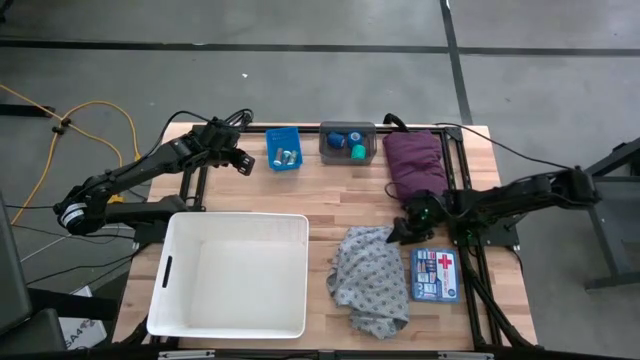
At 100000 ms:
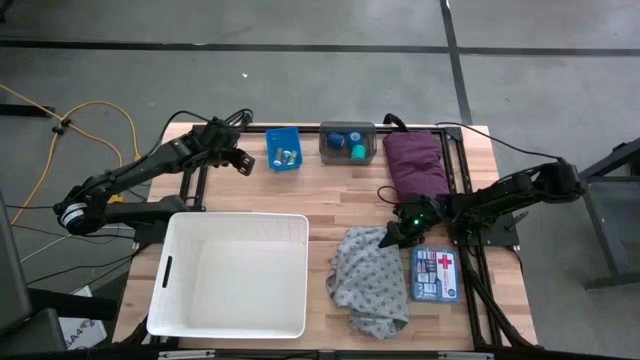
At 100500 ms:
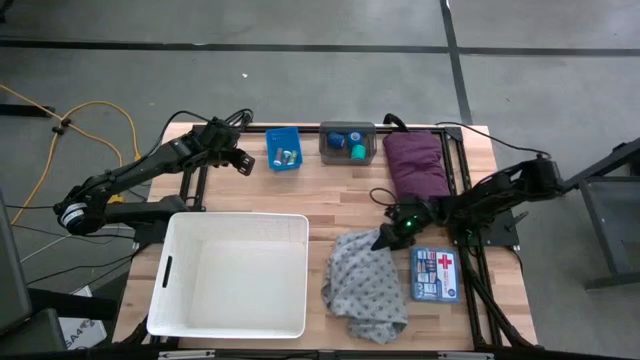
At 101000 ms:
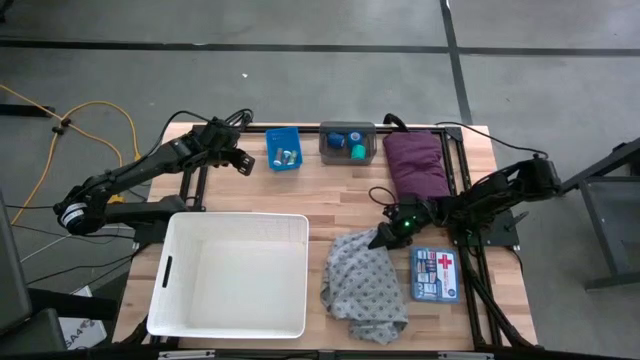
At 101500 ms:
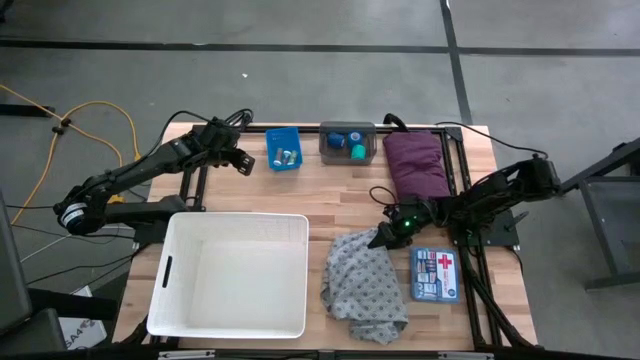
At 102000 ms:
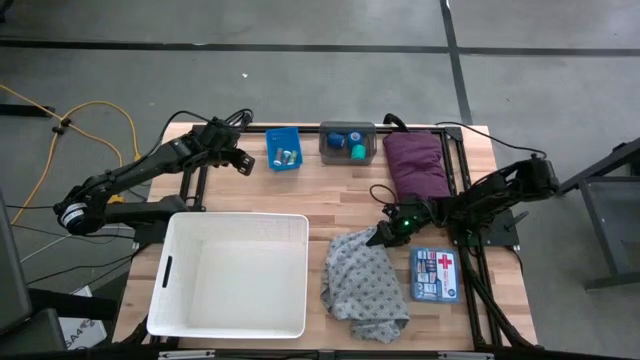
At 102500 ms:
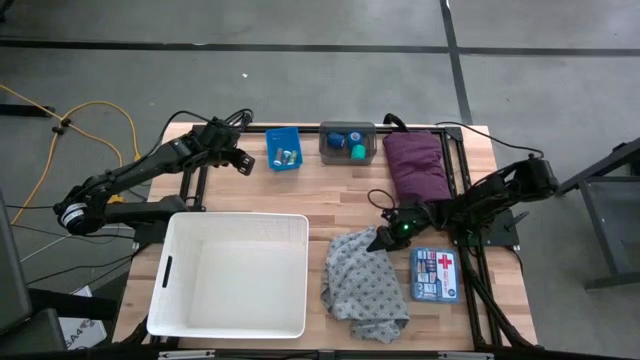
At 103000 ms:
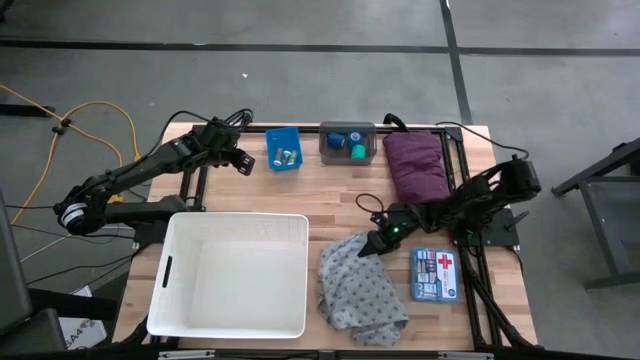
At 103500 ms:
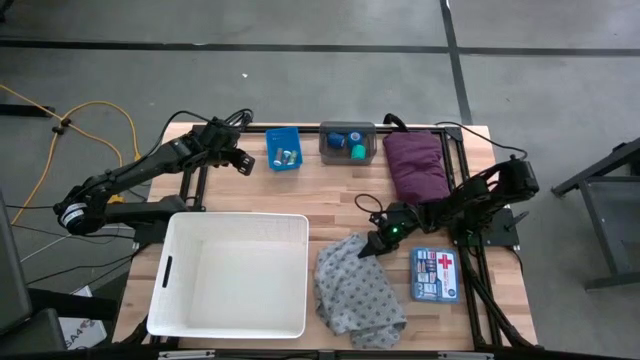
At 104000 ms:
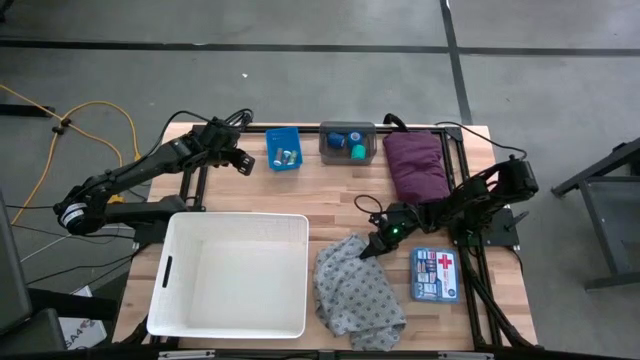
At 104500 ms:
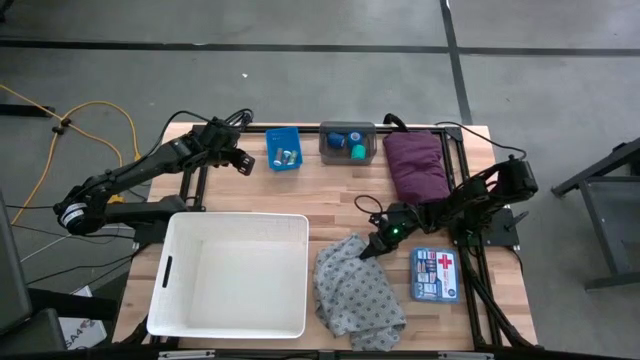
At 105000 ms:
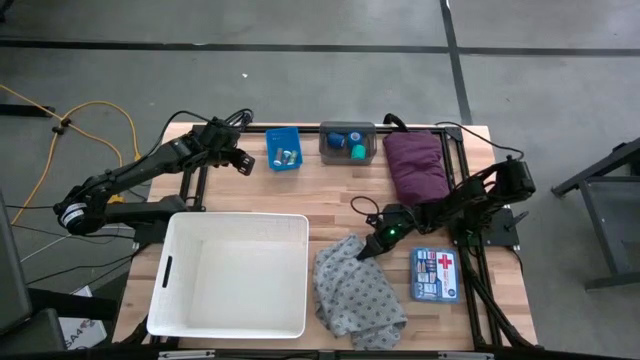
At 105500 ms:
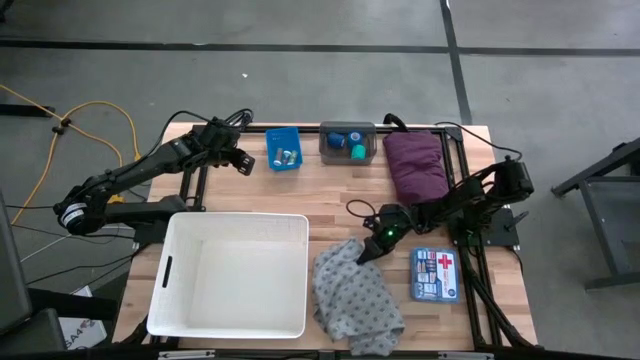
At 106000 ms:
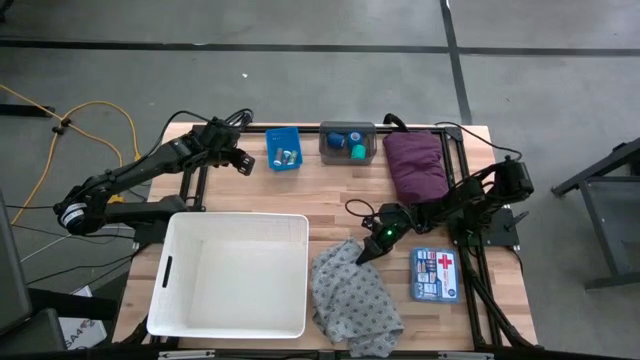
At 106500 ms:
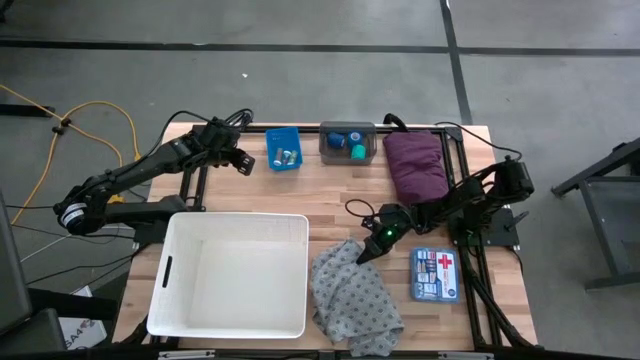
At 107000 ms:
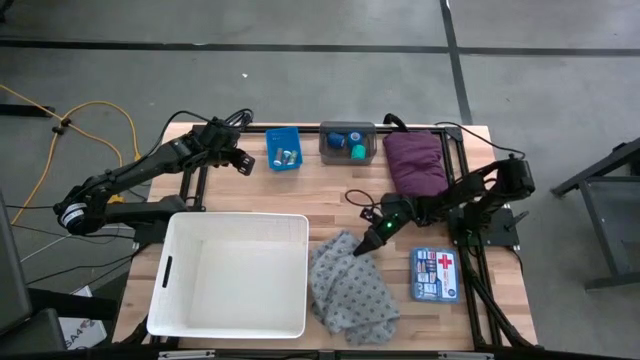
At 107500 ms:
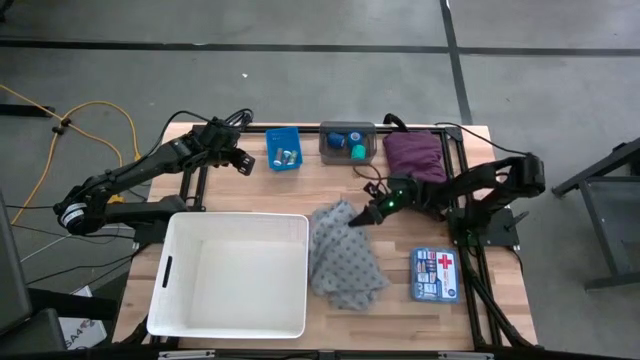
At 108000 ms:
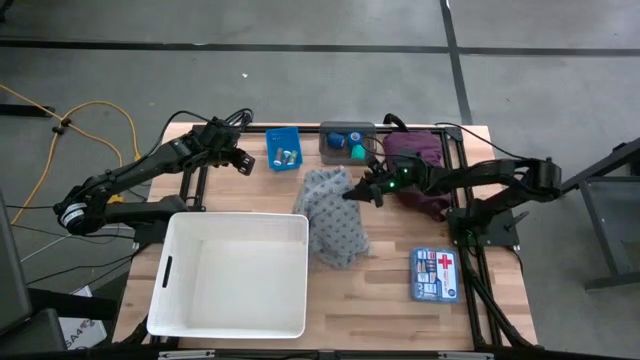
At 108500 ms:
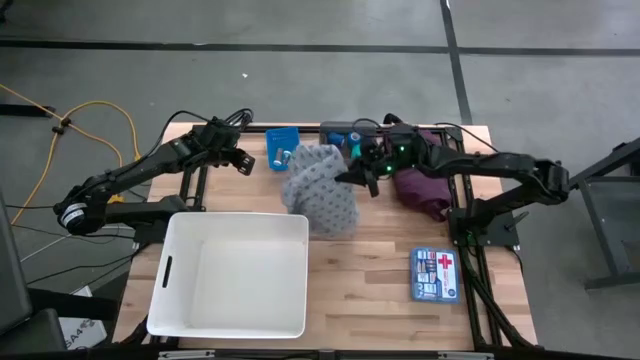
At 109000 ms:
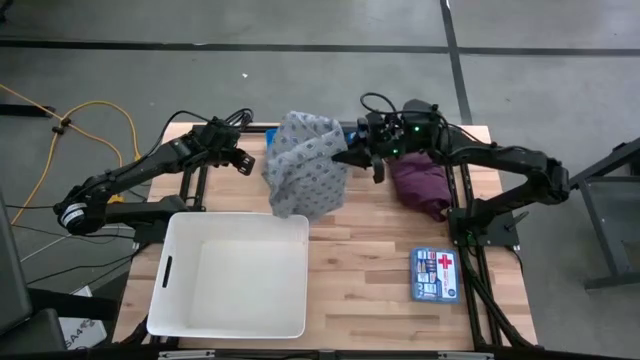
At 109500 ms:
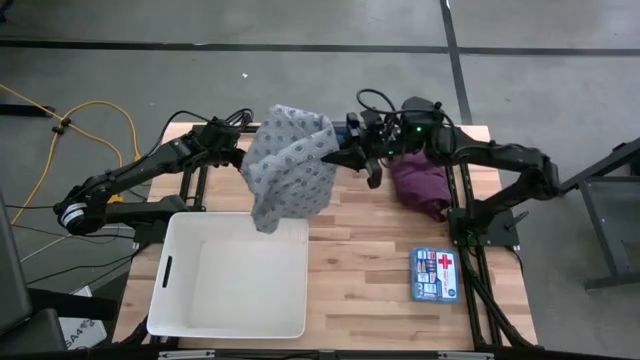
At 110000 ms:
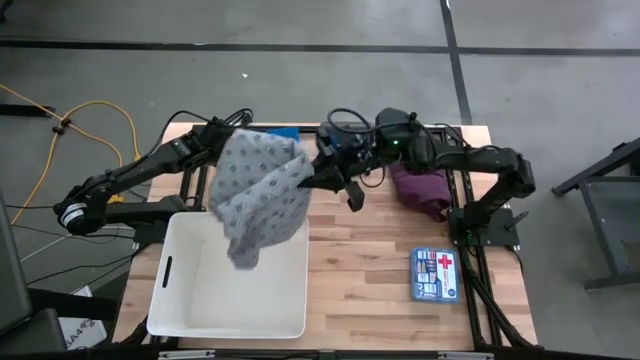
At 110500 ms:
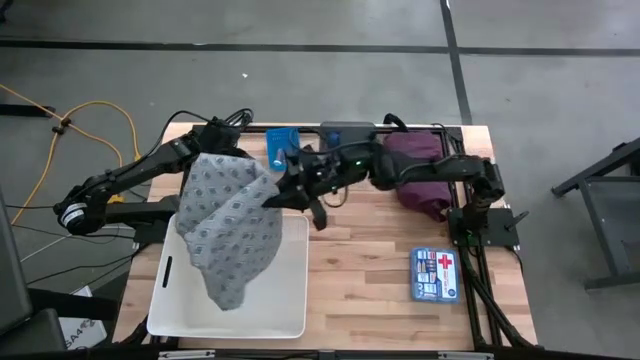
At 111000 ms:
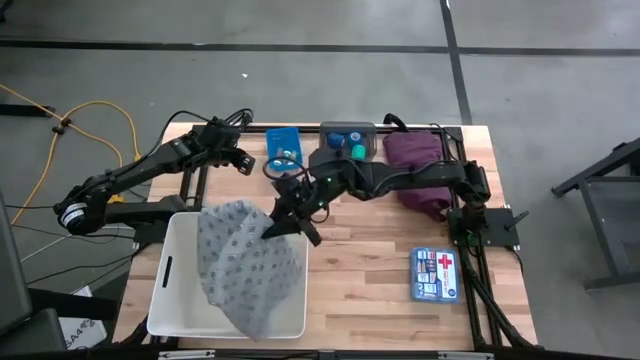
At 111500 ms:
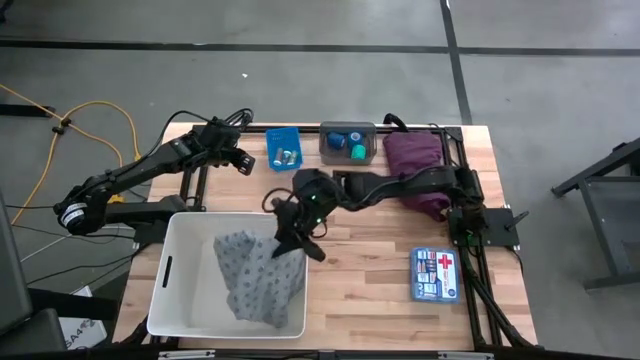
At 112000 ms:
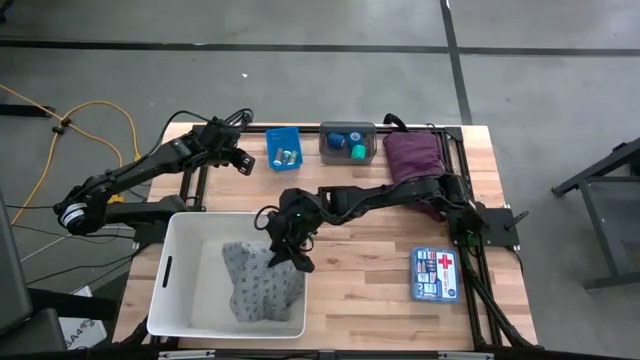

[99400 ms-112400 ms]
Task: Pick & place medical supplies in basket/bin
Put the patient gown into the white bin

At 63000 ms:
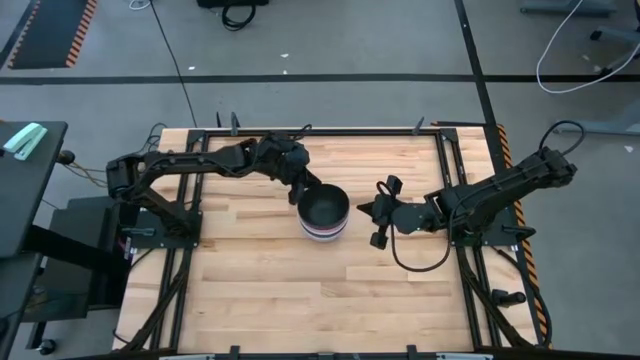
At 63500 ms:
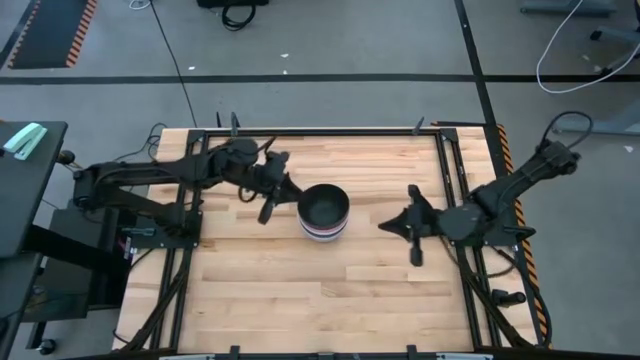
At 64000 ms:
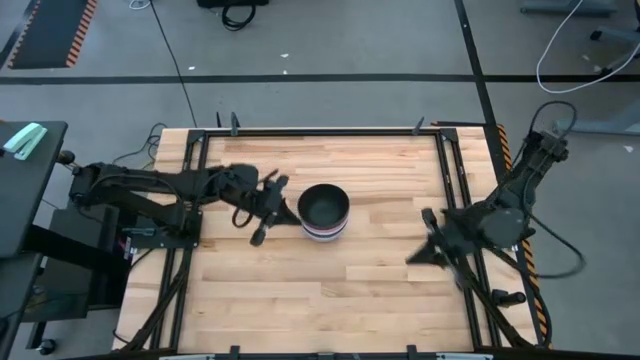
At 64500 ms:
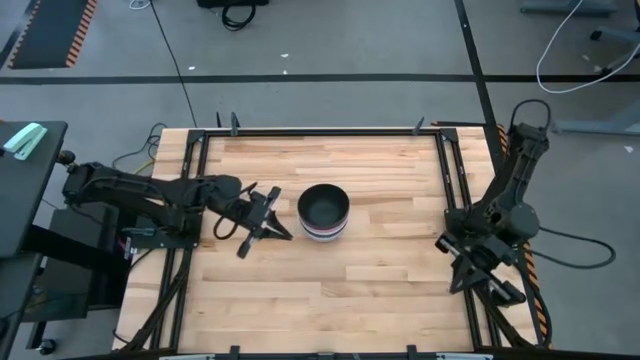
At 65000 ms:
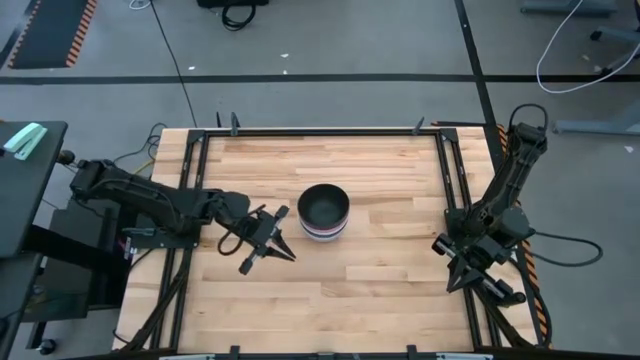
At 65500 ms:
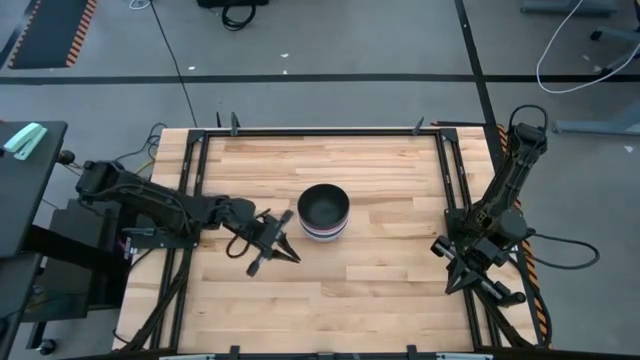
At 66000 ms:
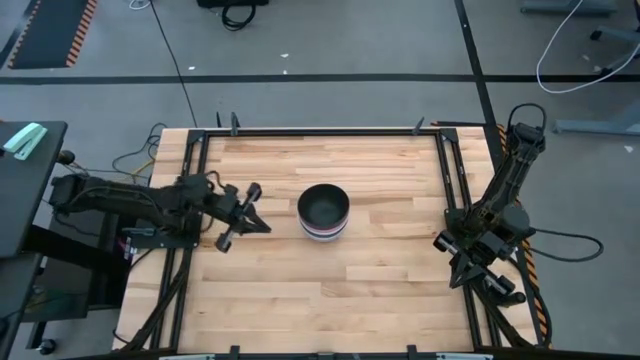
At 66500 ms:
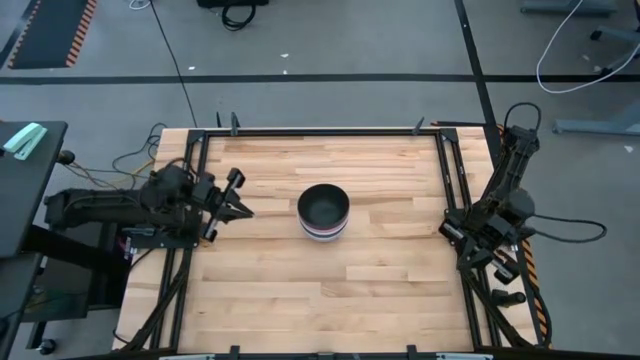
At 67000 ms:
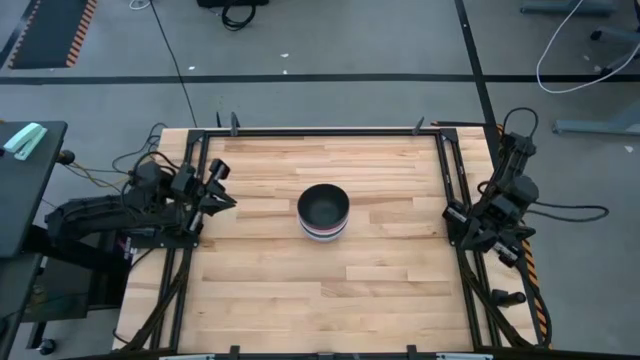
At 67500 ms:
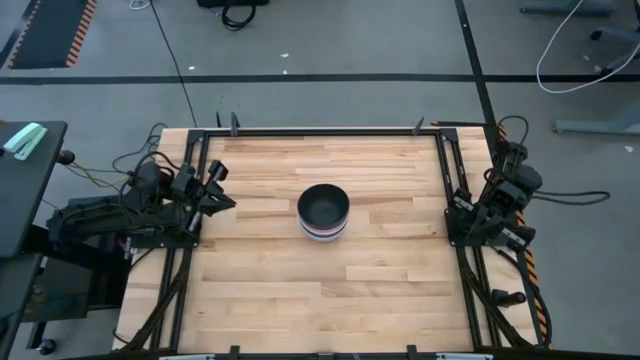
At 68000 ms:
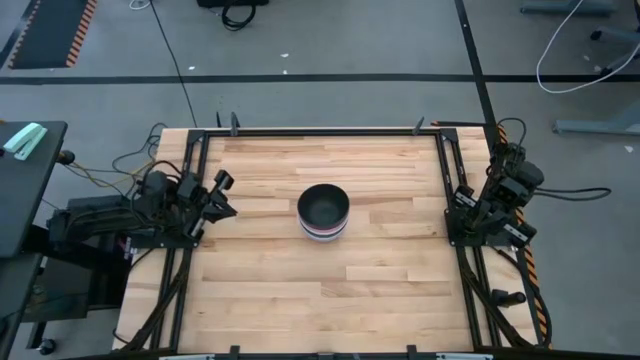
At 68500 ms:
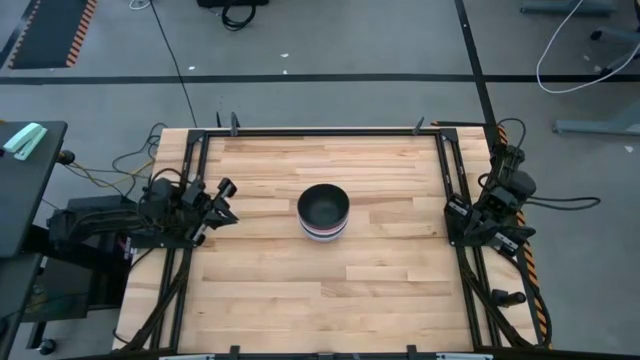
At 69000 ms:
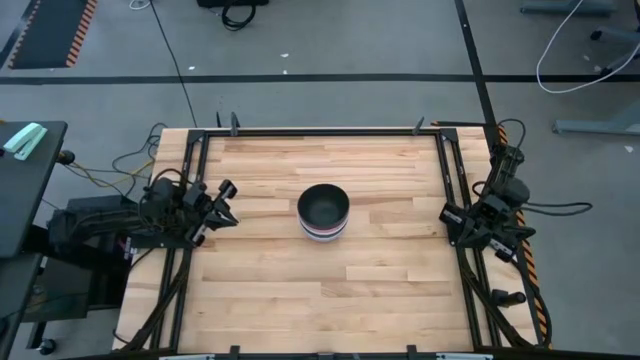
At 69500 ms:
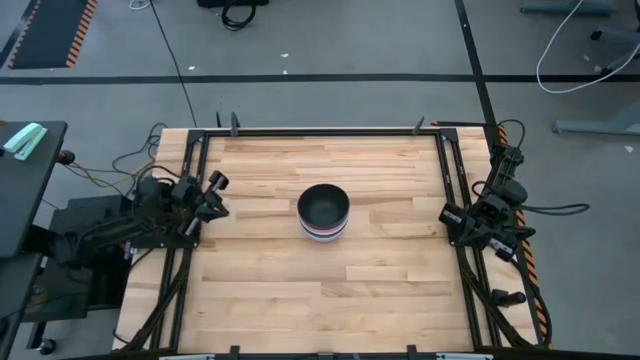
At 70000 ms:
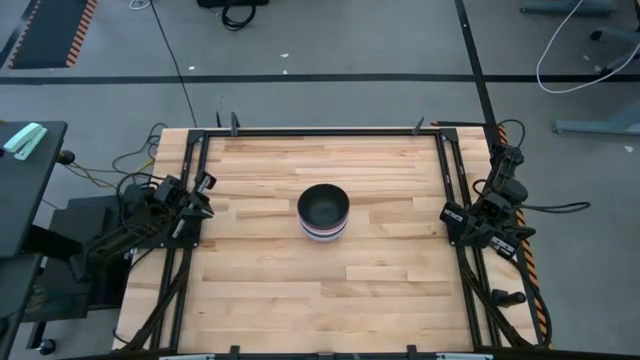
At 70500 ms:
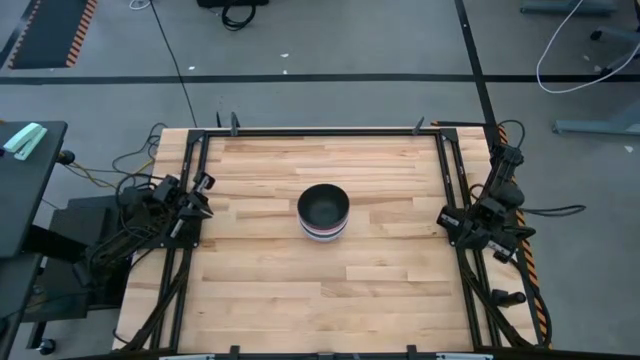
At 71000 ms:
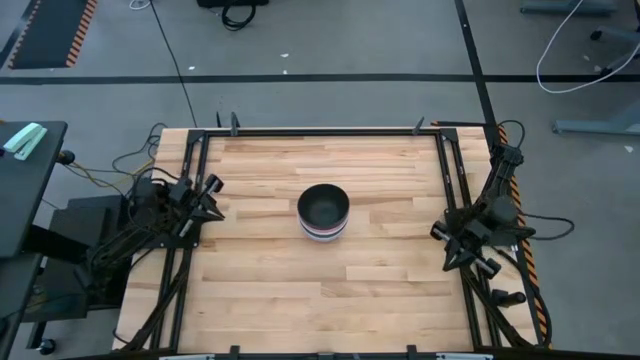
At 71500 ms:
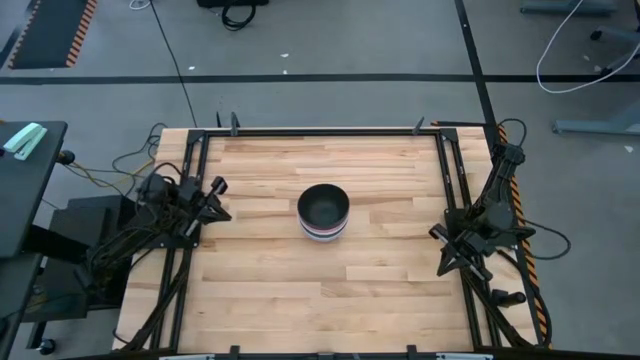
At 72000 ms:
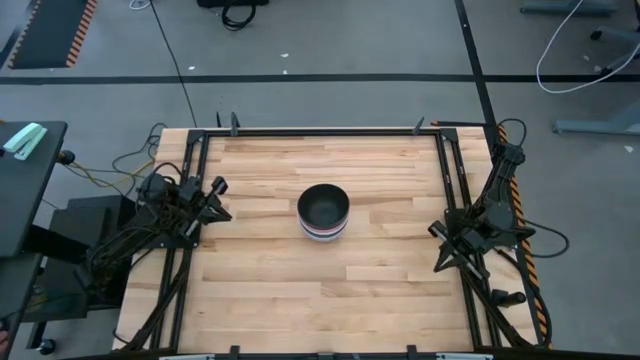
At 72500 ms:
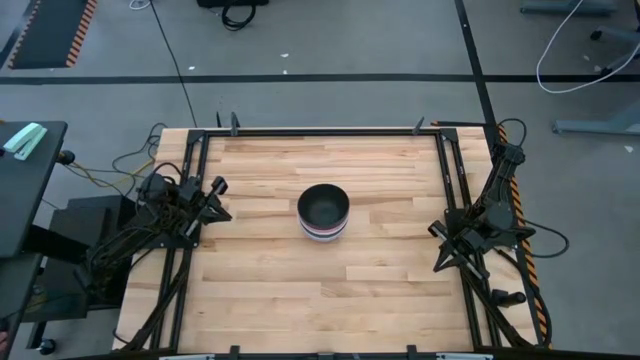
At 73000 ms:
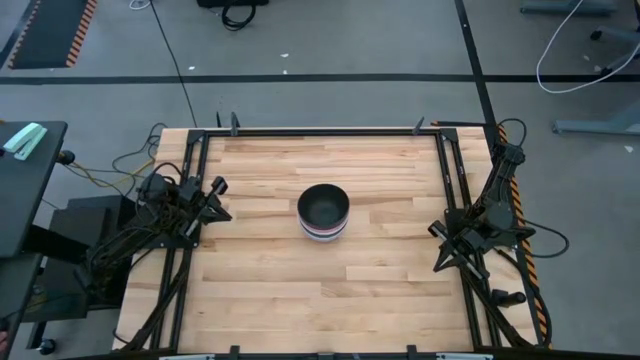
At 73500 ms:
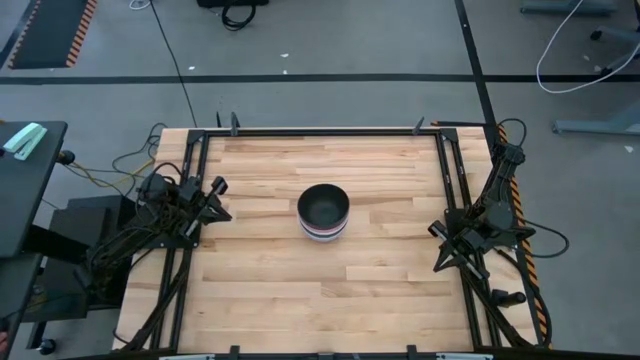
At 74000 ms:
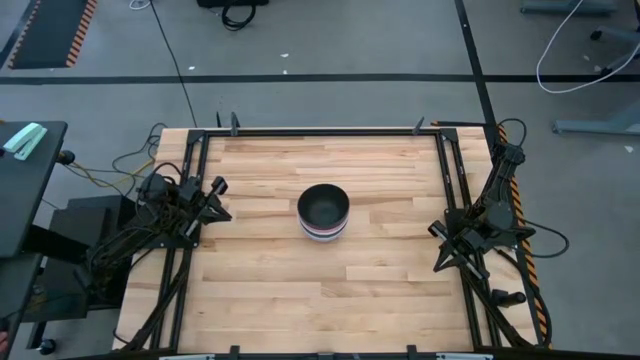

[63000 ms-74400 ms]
Task: Nest bowls inside each other
Return to Home Position
